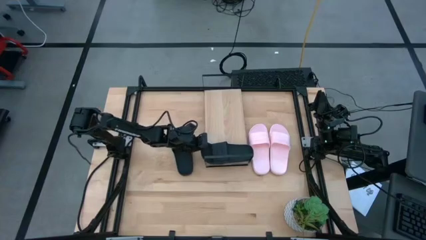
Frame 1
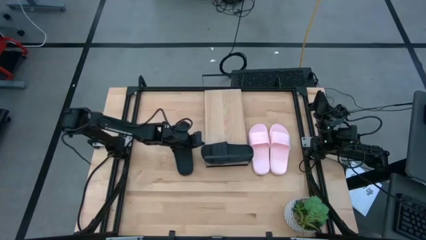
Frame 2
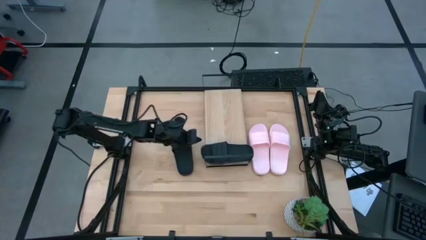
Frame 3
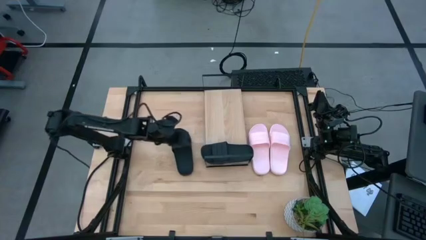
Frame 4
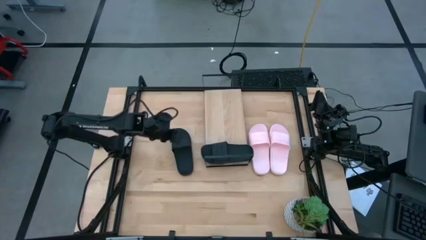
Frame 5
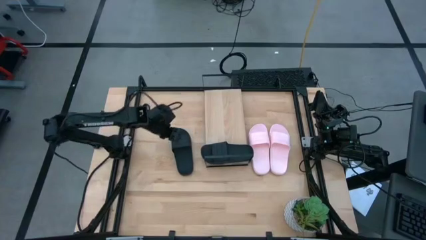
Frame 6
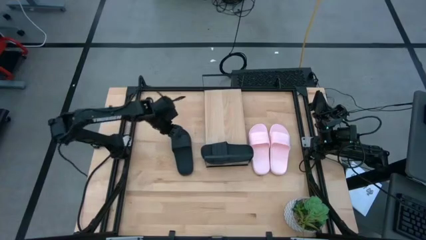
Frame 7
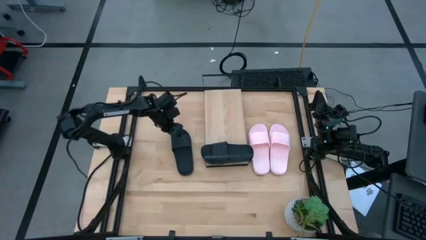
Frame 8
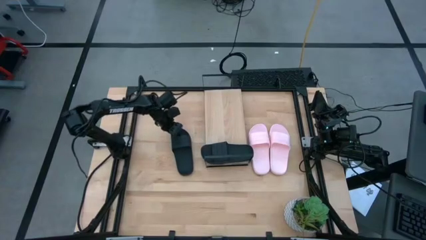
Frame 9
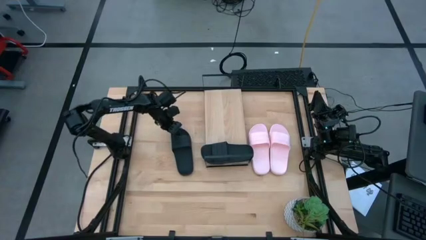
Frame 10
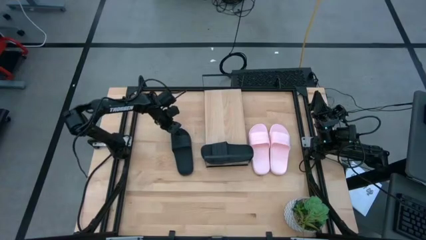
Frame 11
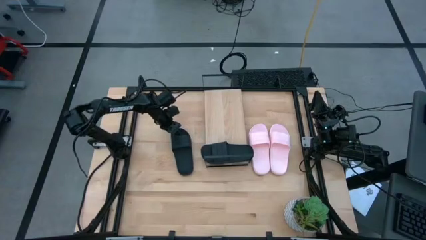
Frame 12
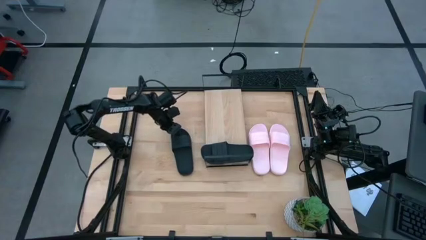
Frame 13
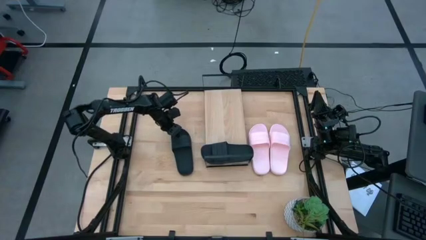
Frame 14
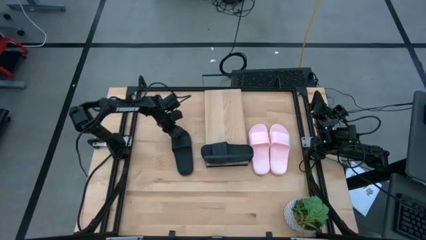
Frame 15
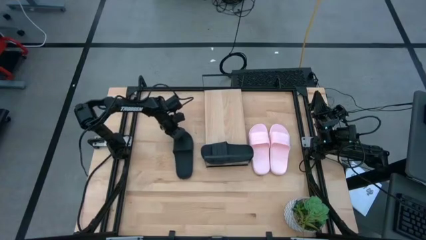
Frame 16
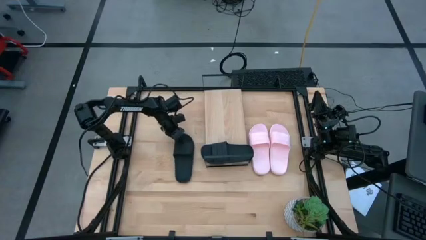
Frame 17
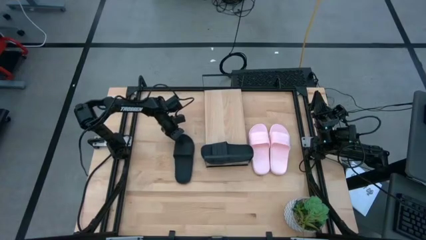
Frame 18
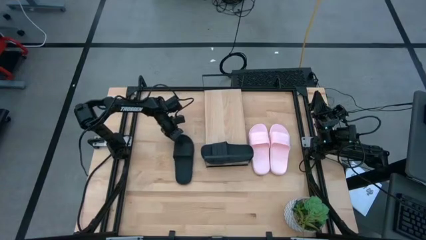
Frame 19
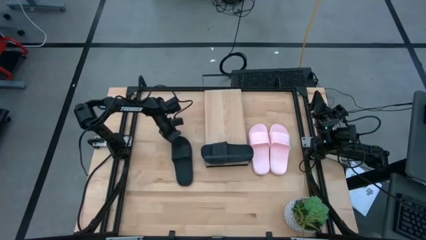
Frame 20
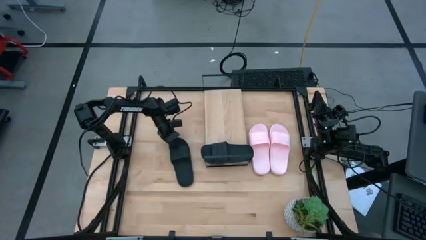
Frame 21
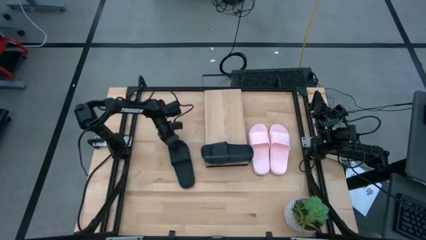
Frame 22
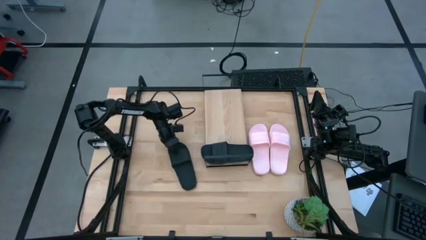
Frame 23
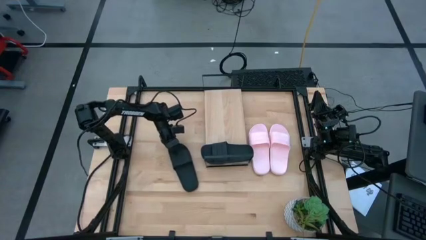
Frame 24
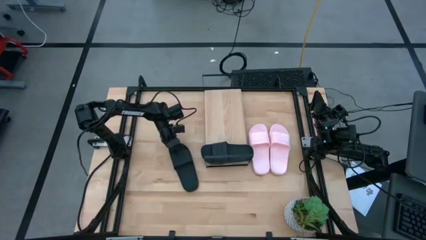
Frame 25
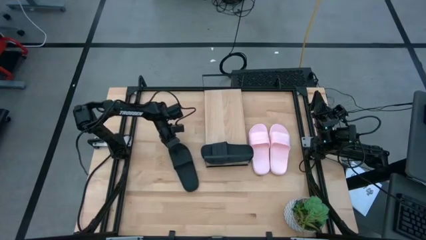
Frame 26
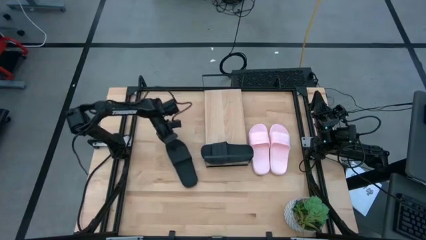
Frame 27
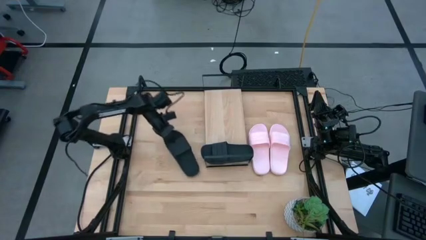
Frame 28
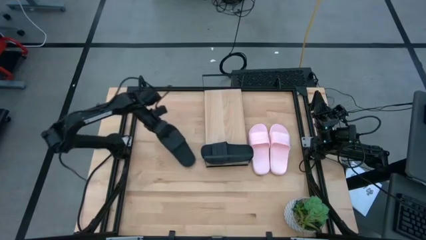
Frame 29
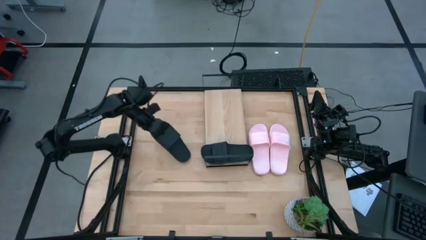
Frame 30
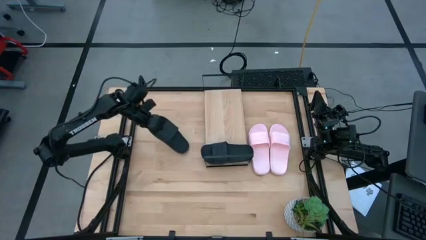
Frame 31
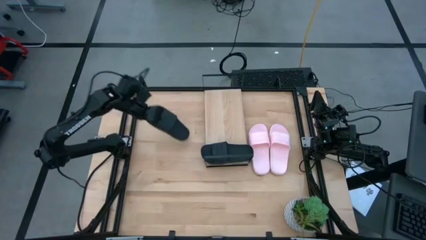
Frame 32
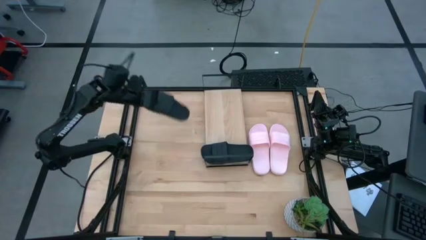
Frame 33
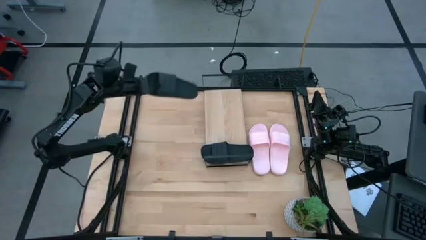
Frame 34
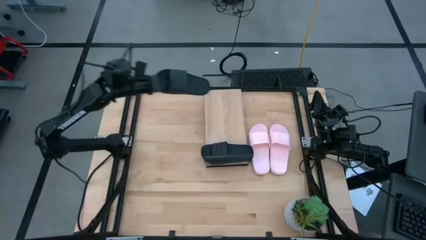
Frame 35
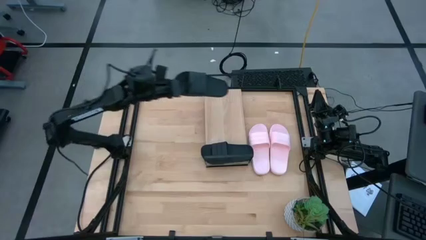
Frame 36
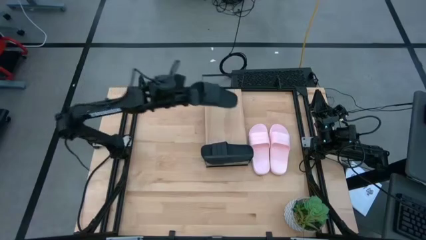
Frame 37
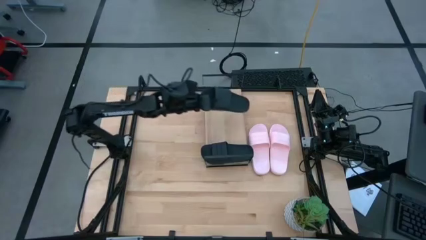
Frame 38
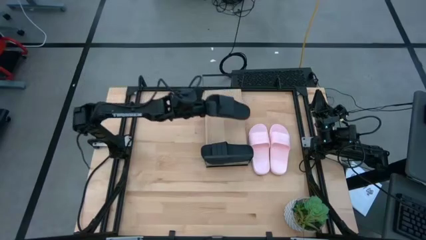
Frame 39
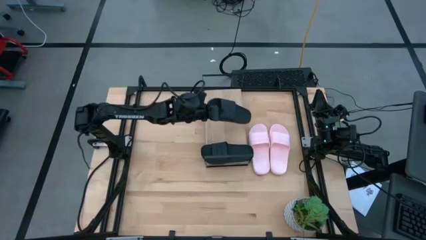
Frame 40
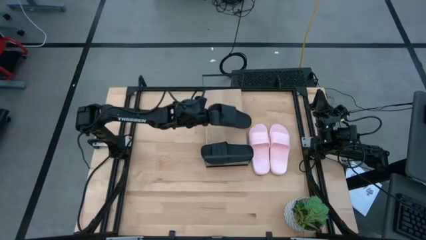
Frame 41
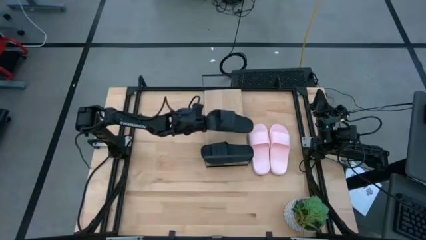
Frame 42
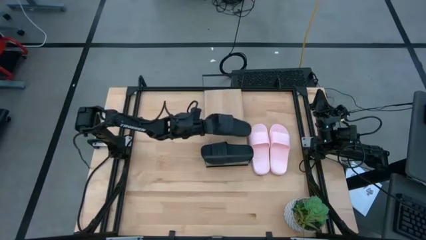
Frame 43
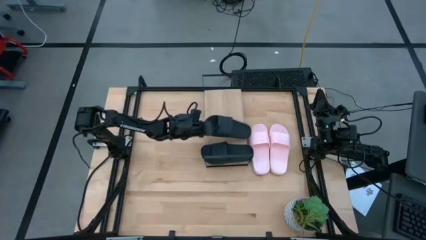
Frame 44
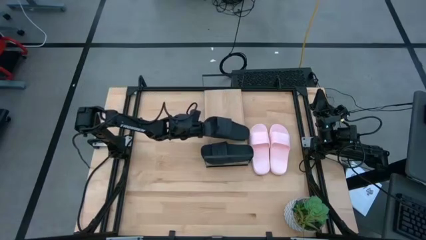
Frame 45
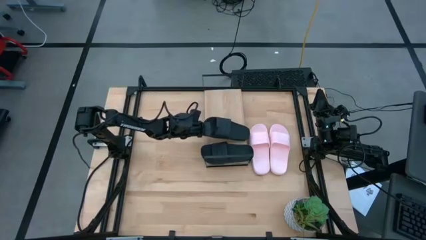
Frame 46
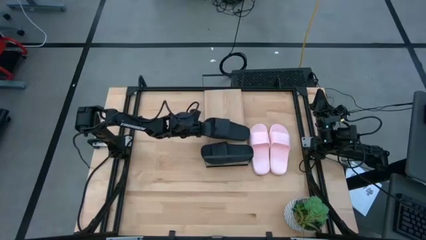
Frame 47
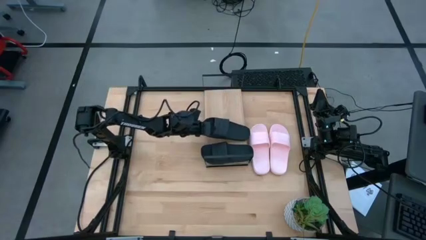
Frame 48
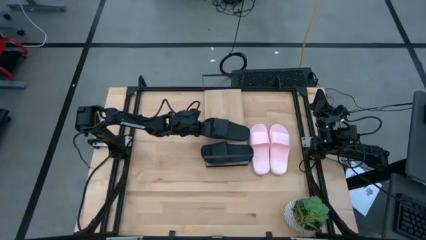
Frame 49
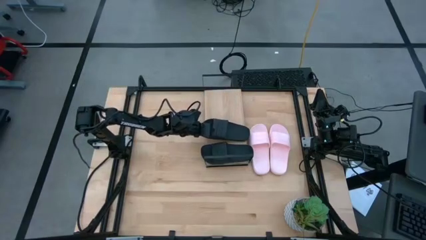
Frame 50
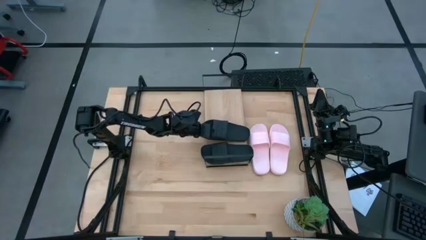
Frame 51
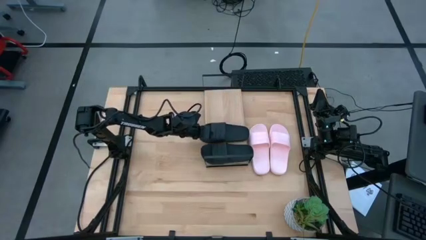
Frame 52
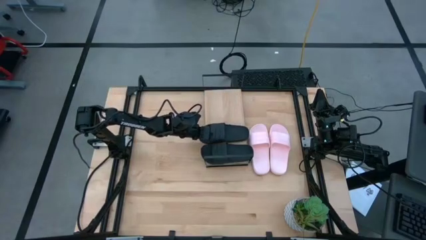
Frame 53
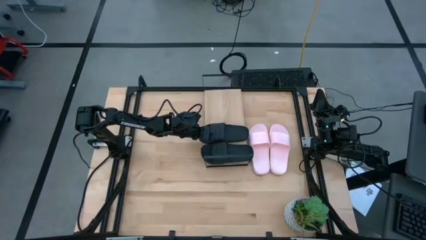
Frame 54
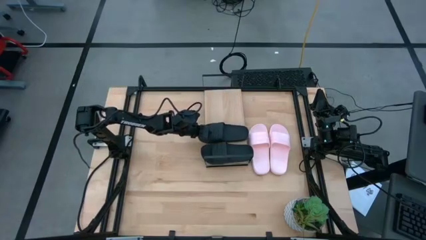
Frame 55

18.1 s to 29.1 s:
Task: Pick and place slides into the shelf
Put the black slide on the shelf

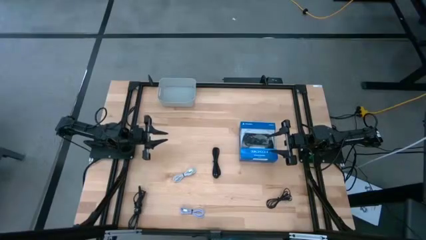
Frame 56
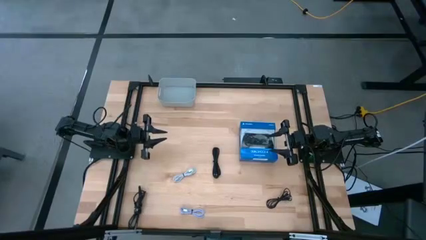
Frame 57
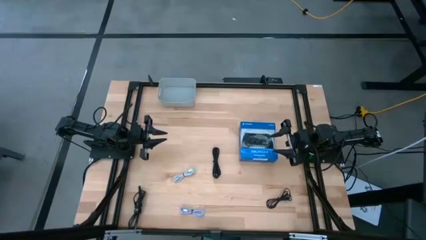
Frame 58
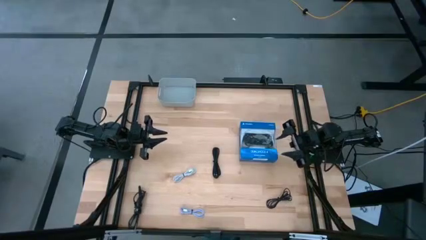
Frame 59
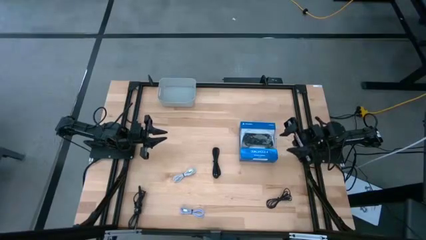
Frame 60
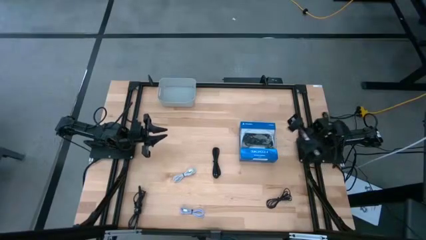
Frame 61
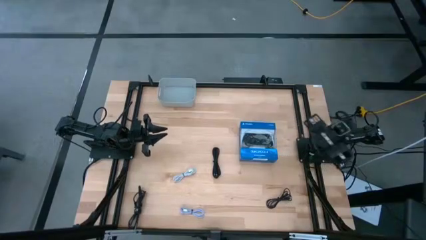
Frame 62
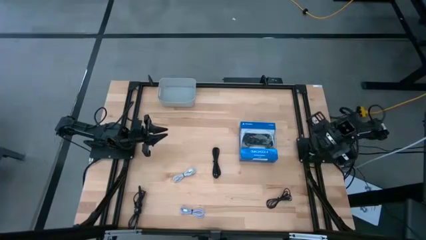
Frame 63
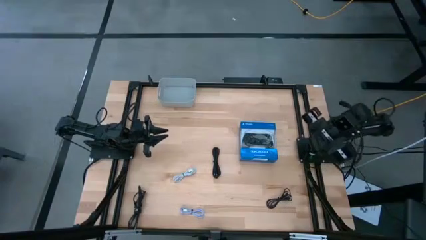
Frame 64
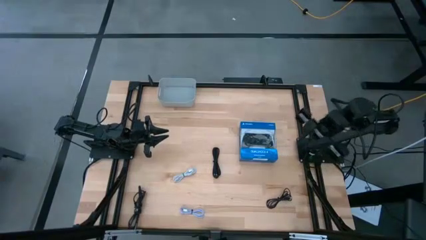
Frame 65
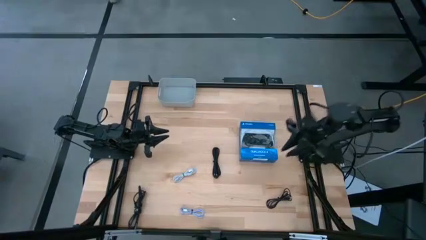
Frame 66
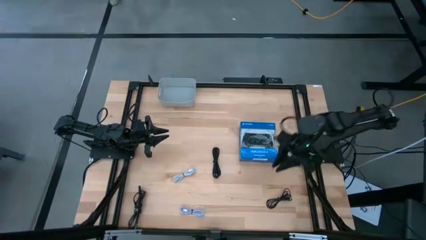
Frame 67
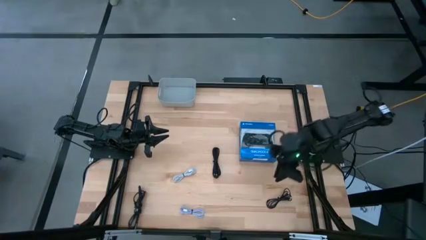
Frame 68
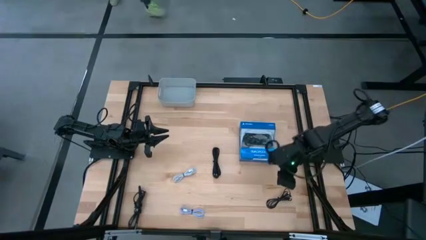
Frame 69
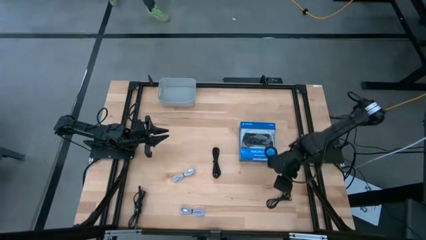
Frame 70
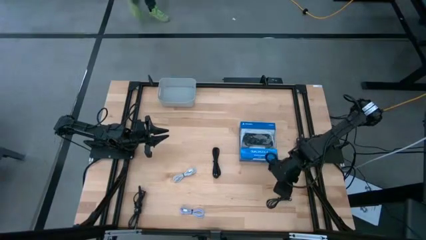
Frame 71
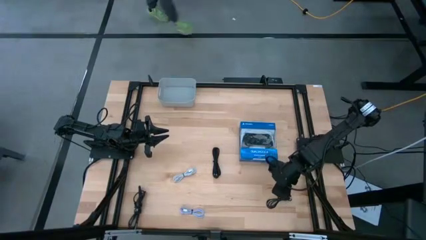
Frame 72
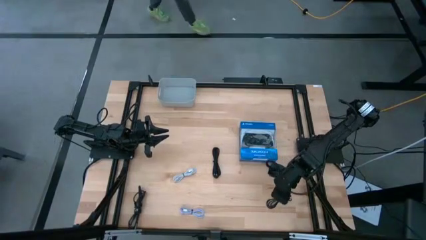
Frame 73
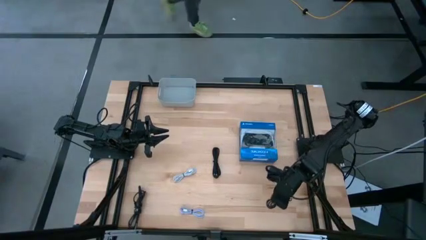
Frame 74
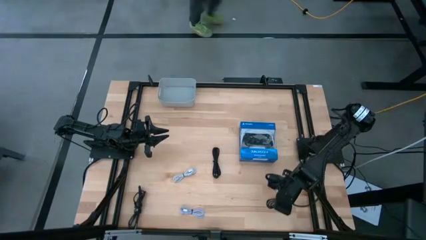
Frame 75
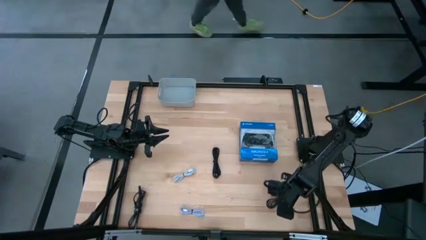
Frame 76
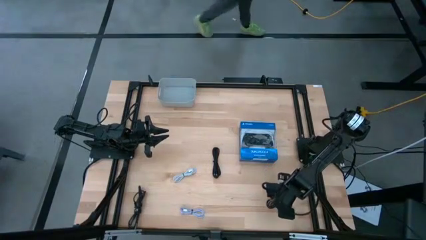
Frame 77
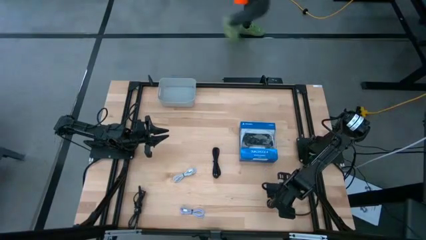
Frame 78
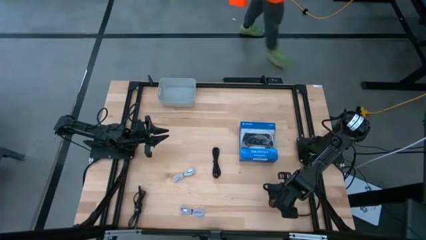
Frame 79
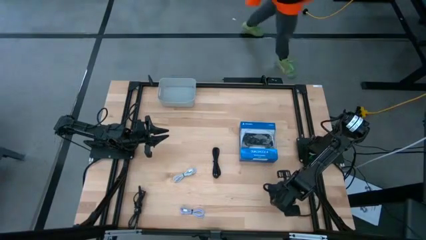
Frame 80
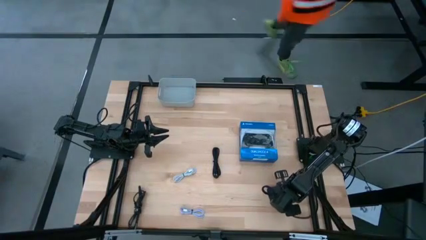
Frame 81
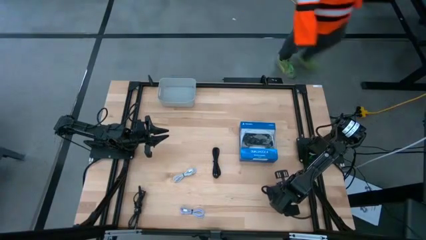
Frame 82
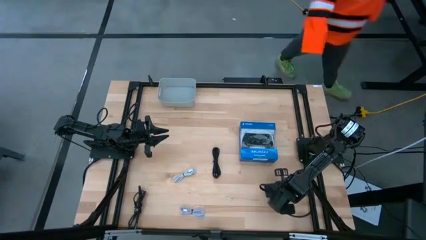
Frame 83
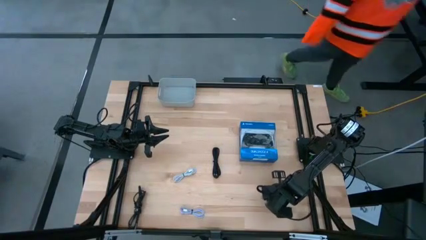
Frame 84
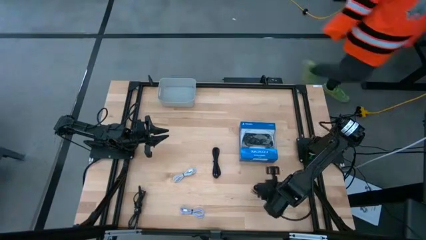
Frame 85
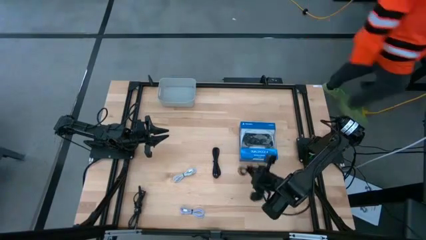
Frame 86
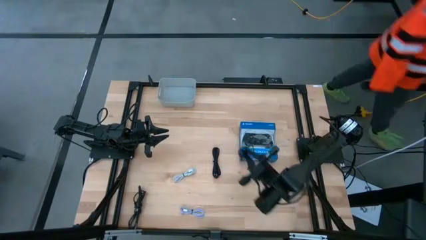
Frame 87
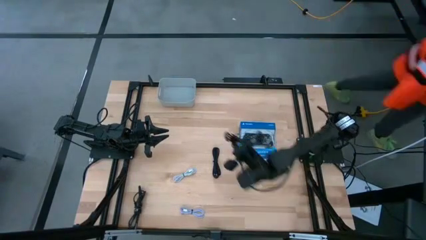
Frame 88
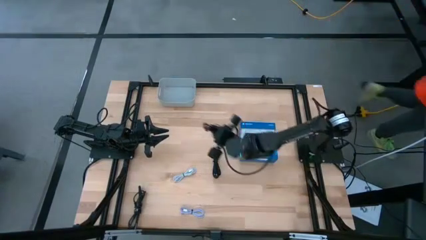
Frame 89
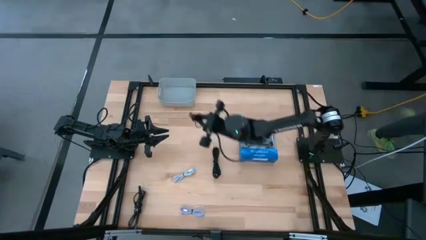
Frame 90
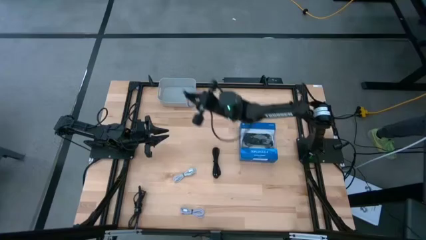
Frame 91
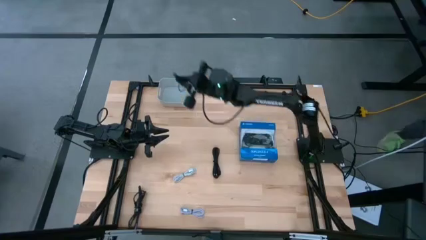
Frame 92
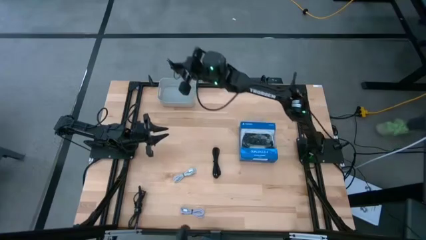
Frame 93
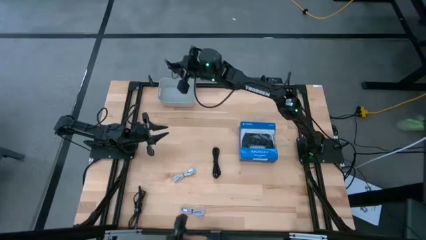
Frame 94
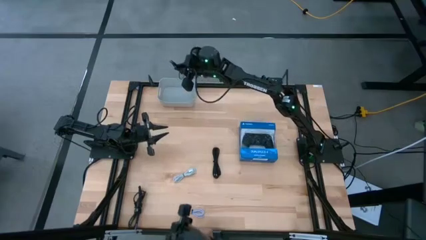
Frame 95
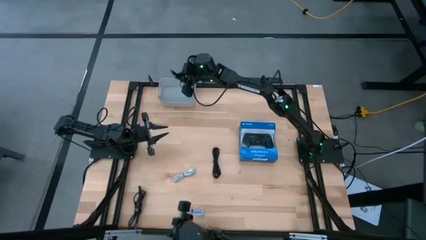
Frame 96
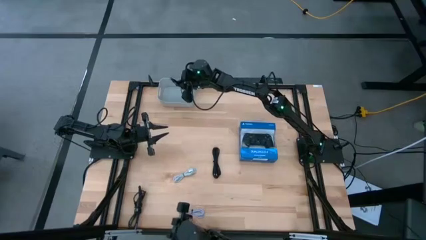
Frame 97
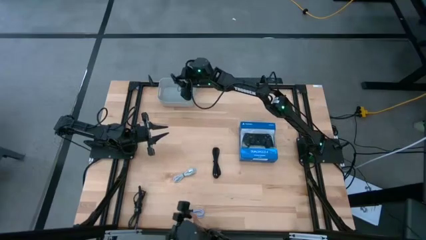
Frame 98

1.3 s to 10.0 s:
Task: Pick and place USB-C Cables
Put the bottom black charger cable into the gray bin
